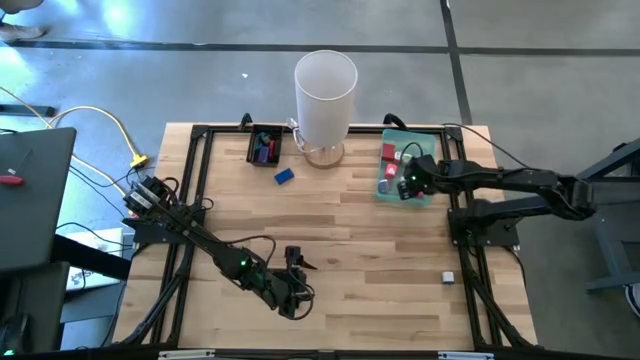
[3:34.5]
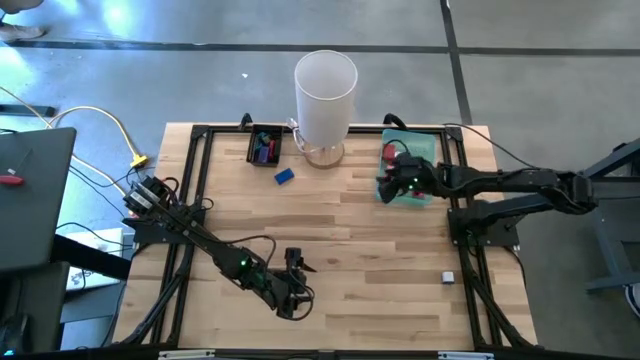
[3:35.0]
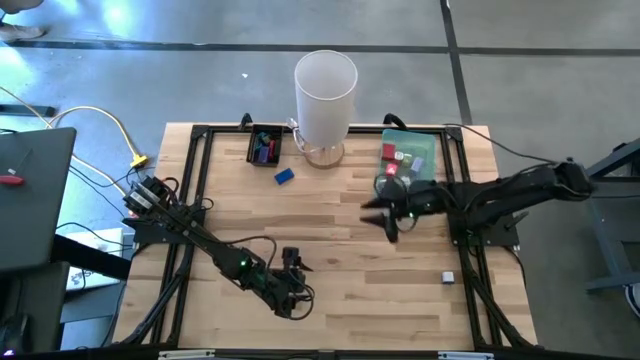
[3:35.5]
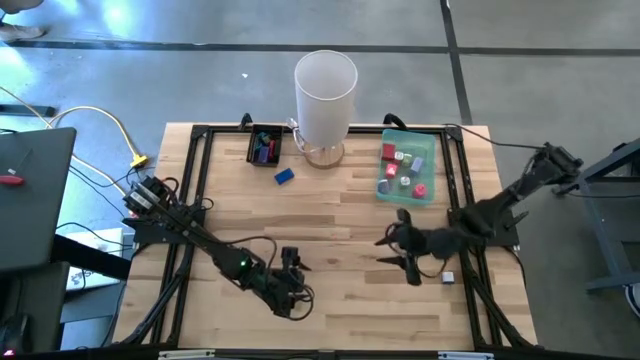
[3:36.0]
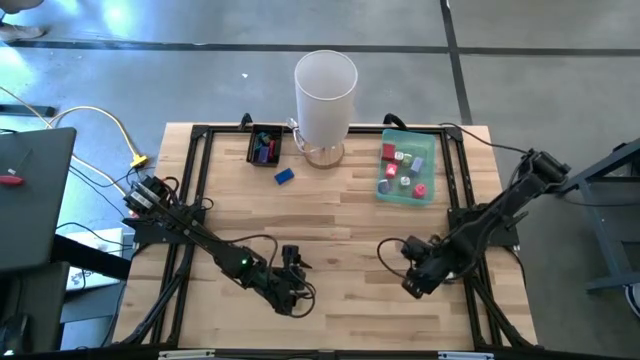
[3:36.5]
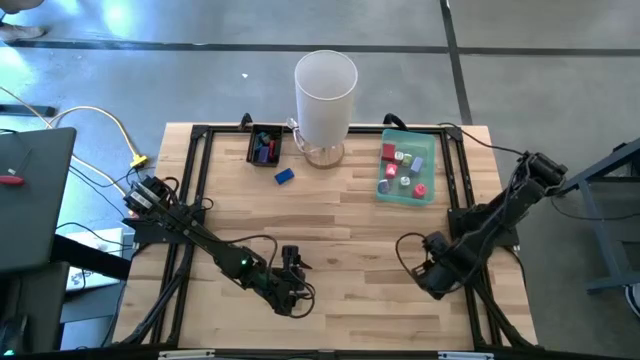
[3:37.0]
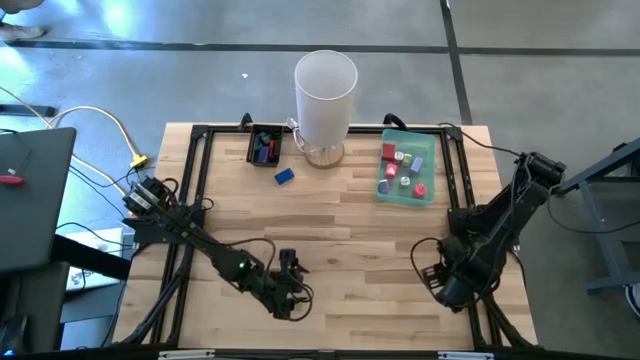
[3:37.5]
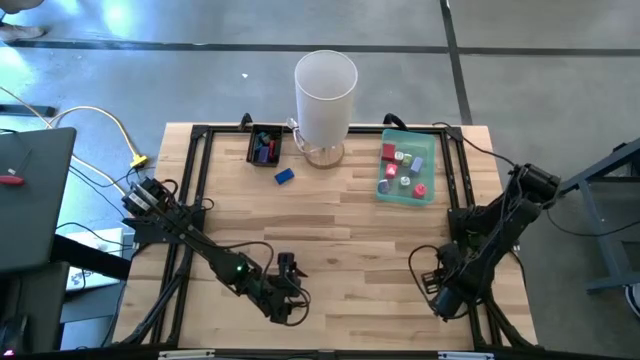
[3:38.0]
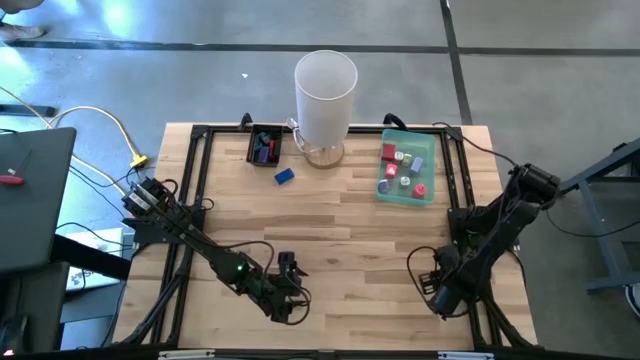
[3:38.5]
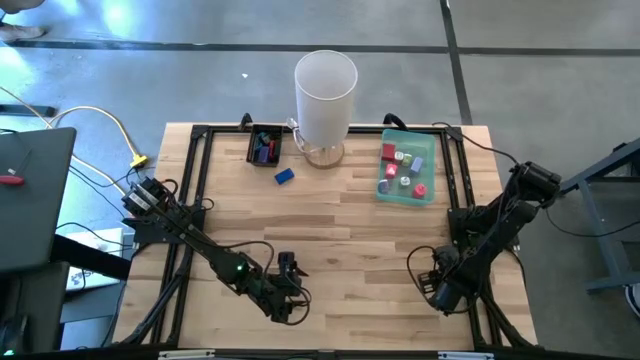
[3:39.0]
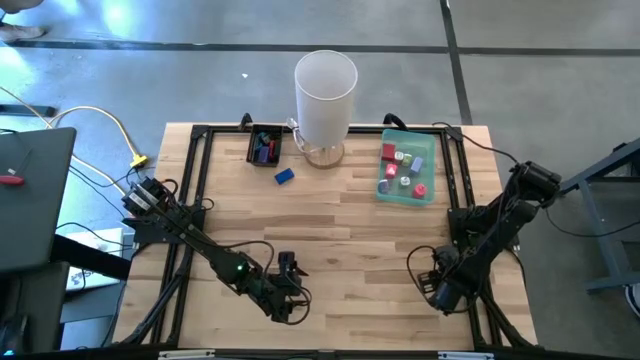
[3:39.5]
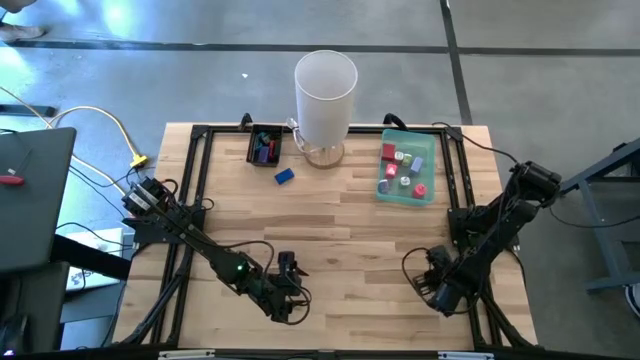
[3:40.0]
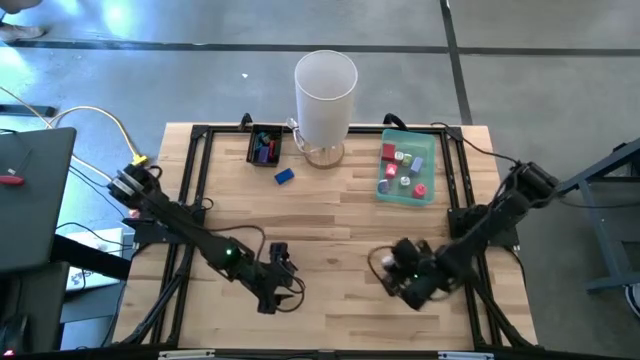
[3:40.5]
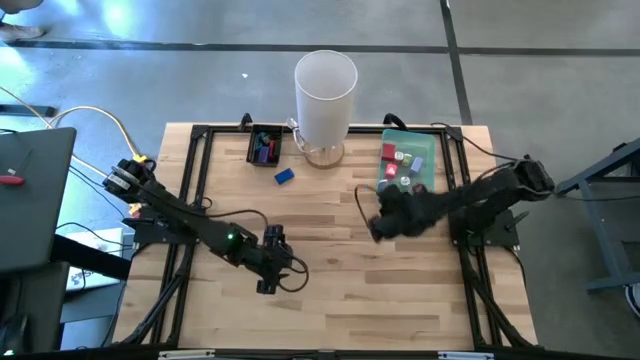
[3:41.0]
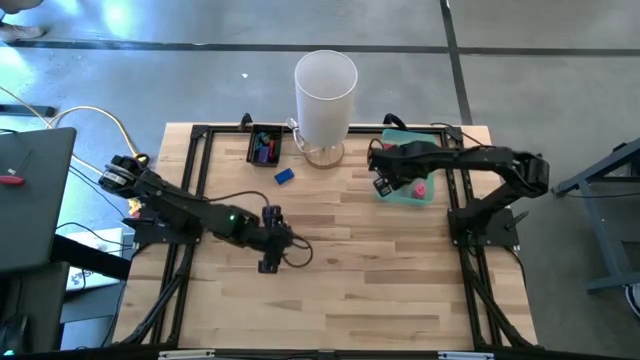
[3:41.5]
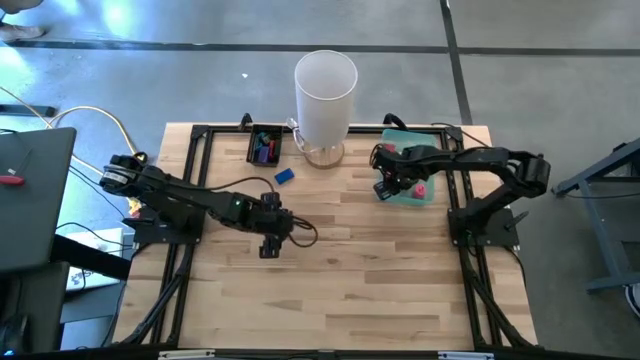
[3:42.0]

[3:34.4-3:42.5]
Task: Pick & Place Office items
Put the white adapter into the green bin

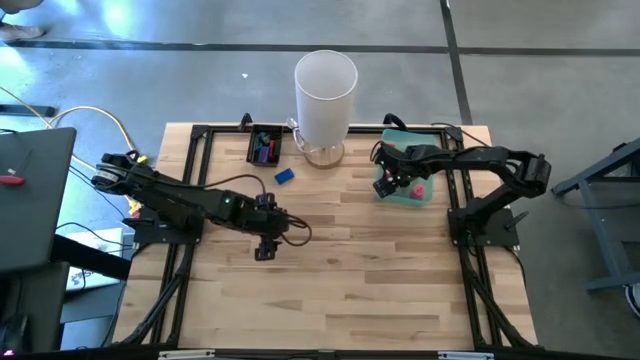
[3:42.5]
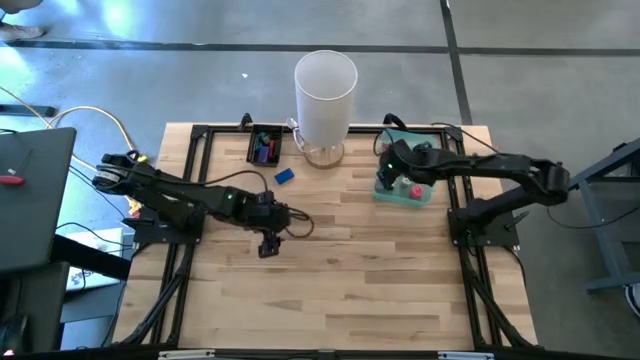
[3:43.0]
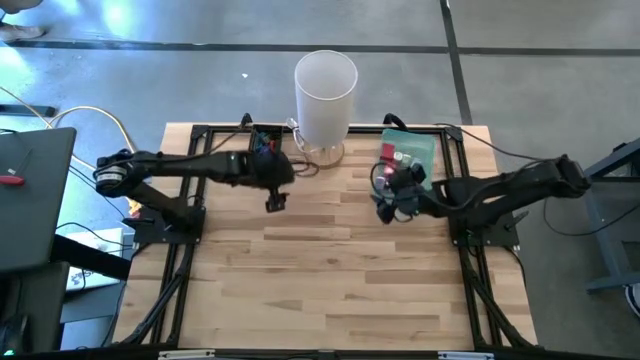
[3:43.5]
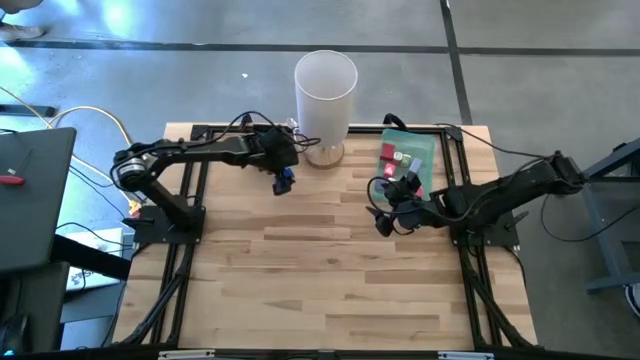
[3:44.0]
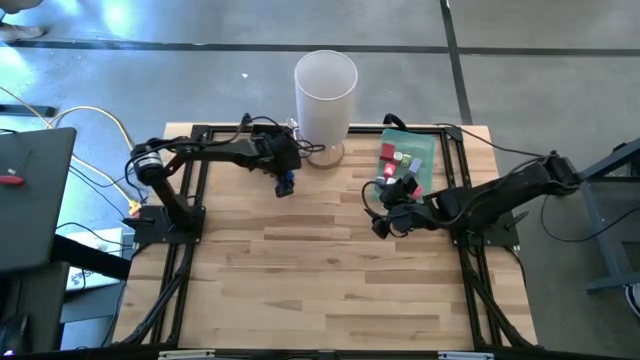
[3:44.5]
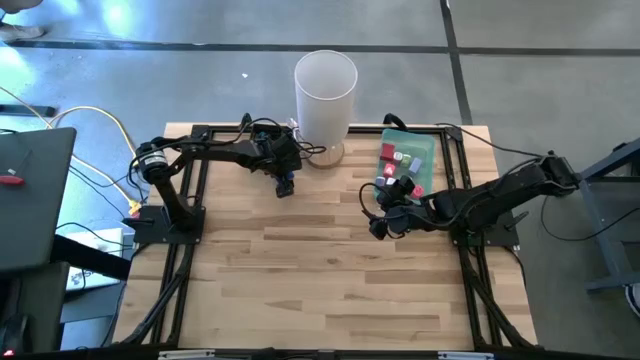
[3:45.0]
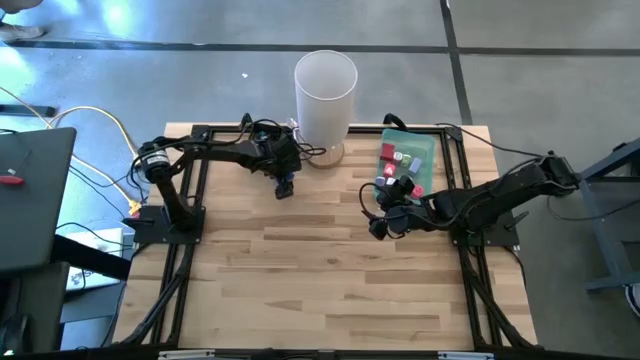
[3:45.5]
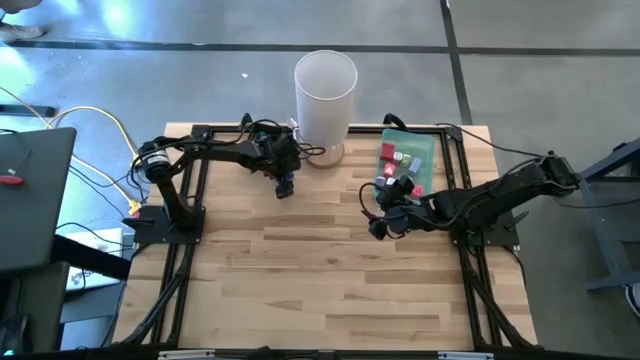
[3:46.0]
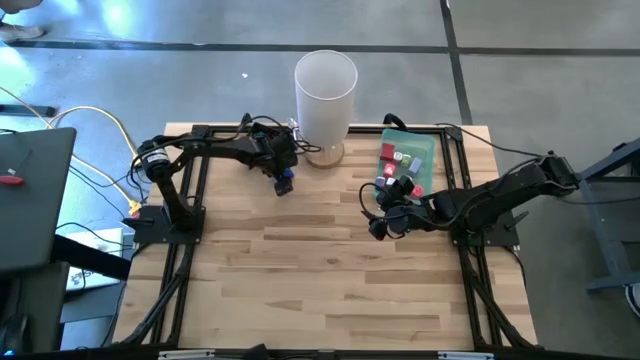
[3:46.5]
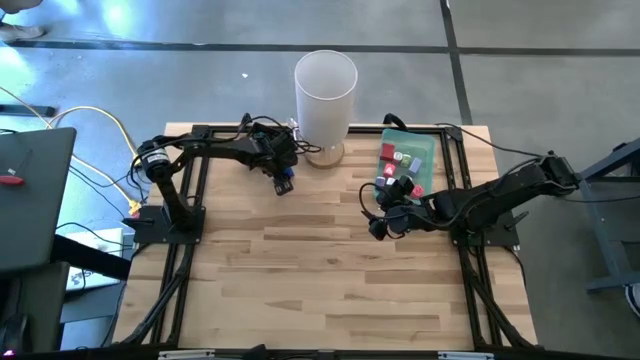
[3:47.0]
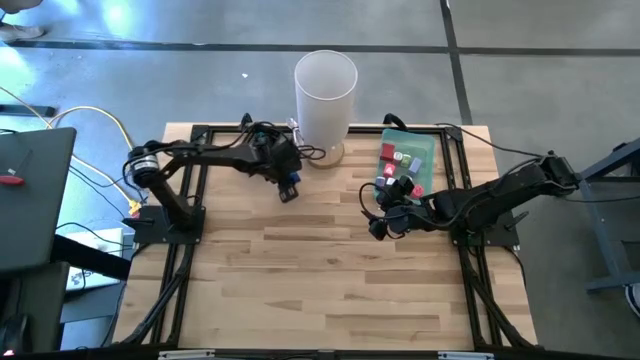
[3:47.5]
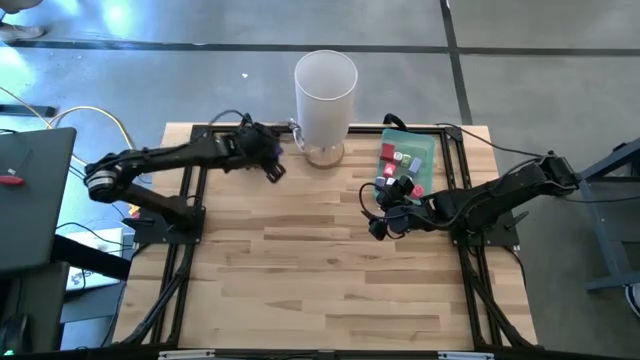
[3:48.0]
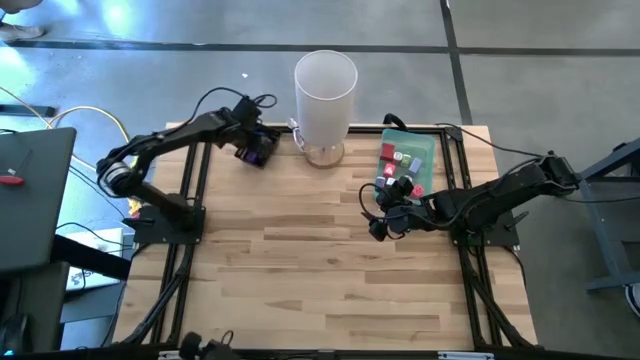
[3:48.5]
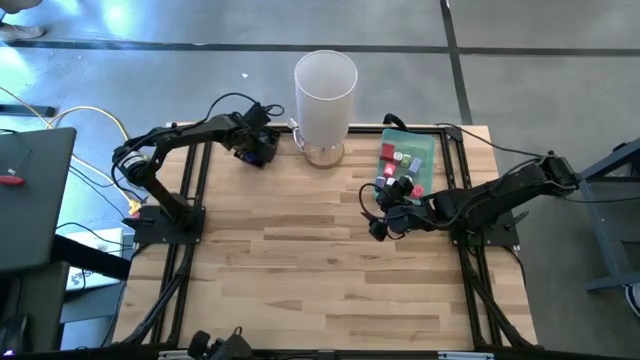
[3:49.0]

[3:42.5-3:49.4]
Put the blue digital clock into the black bin

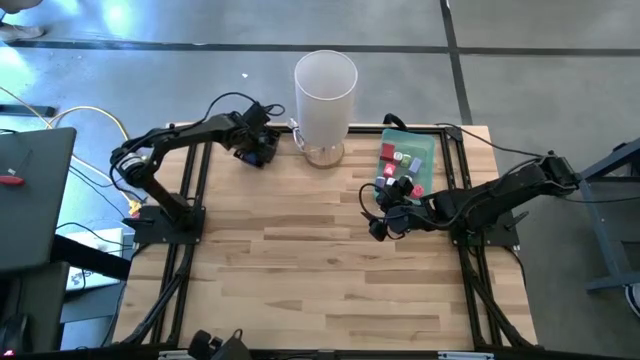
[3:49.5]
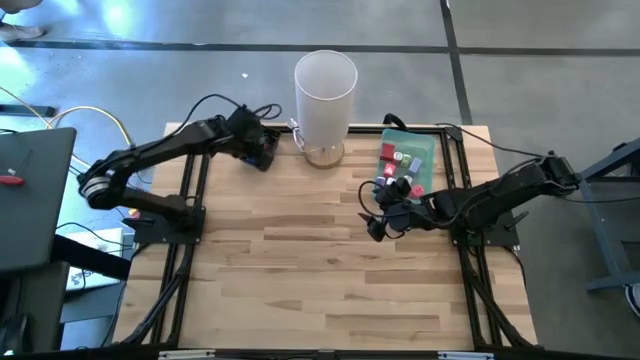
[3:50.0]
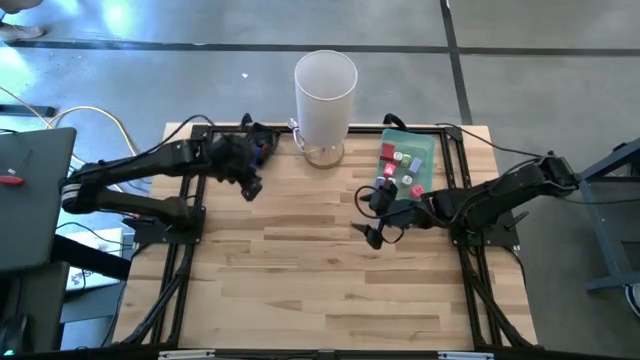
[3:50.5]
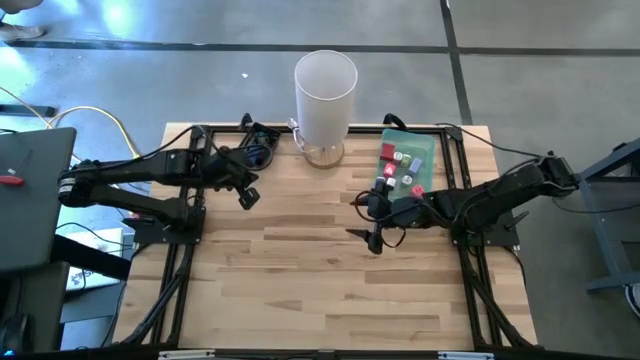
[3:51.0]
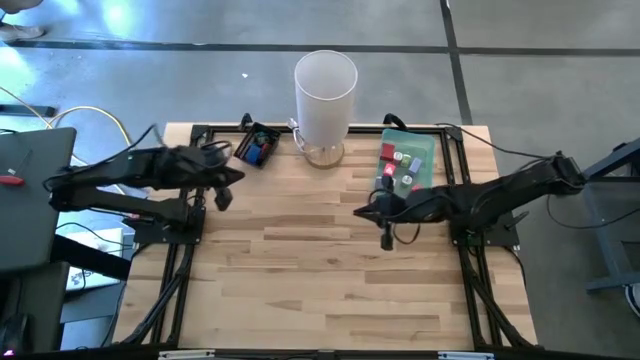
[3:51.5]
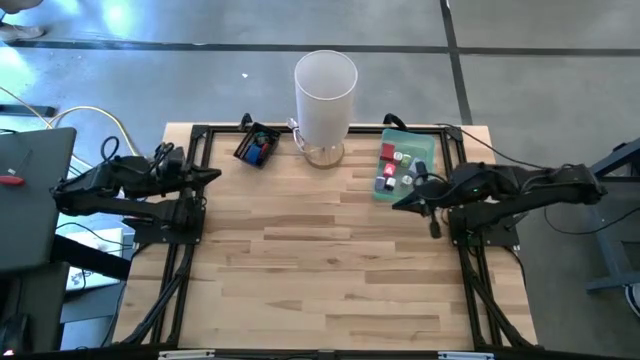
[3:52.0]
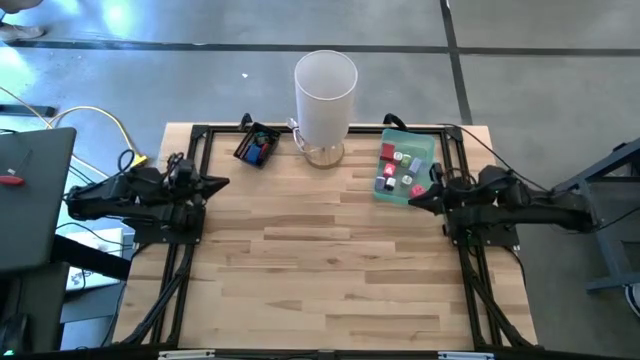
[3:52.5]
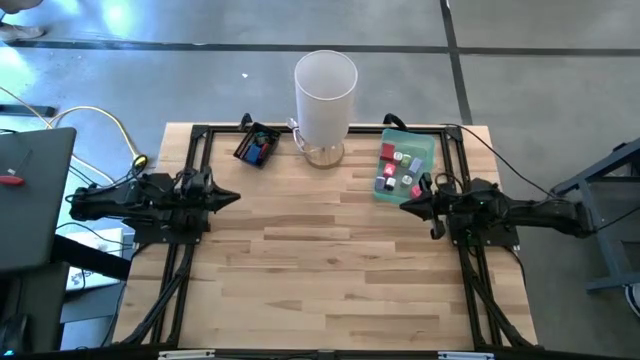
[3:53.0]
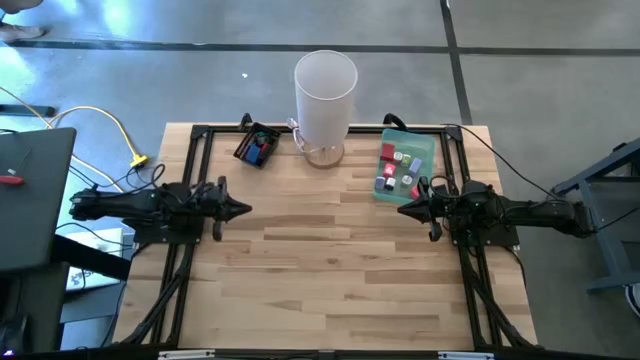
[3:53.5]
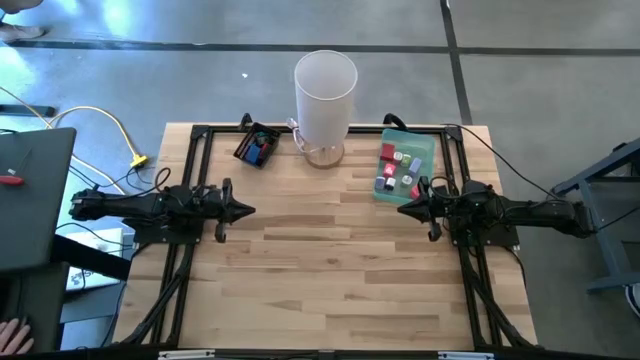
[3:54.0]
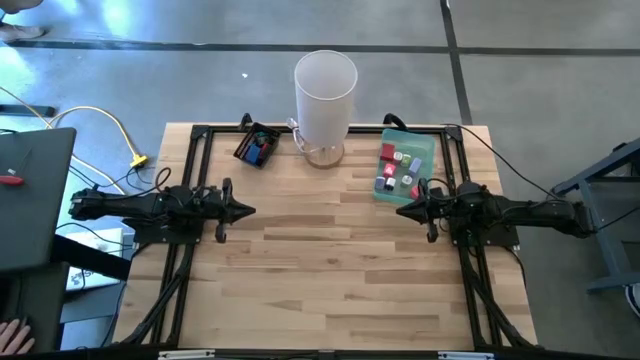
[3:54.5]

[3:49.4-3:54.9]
Return to Home Position
